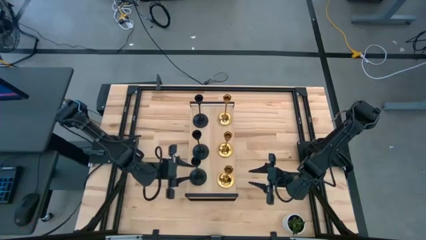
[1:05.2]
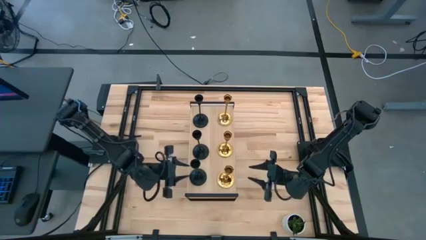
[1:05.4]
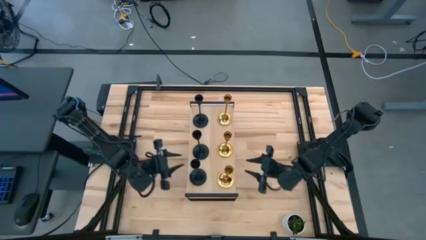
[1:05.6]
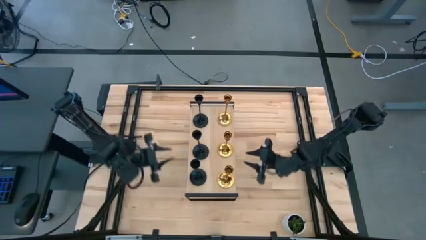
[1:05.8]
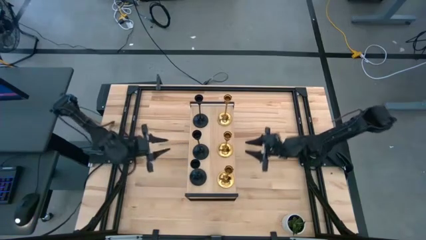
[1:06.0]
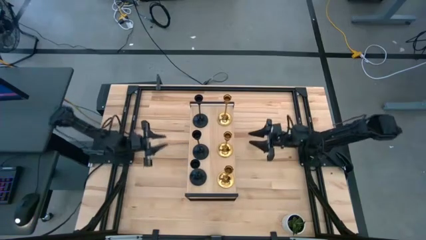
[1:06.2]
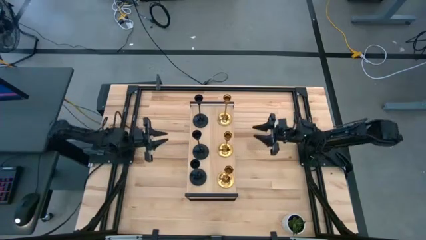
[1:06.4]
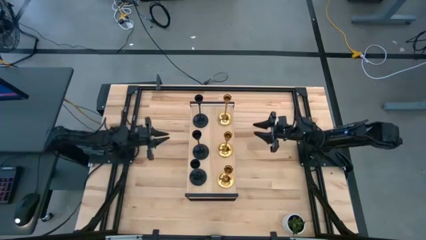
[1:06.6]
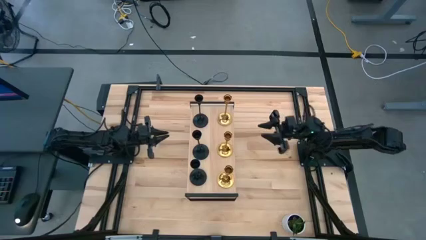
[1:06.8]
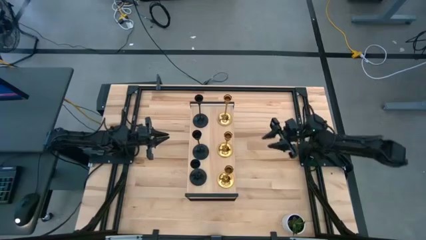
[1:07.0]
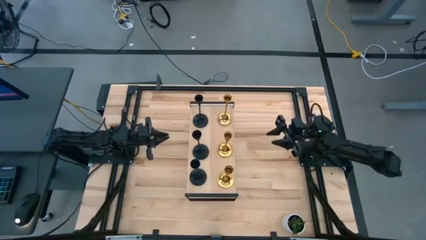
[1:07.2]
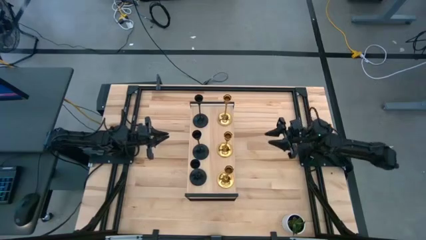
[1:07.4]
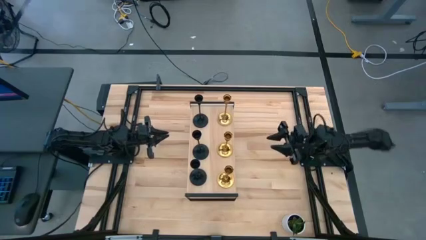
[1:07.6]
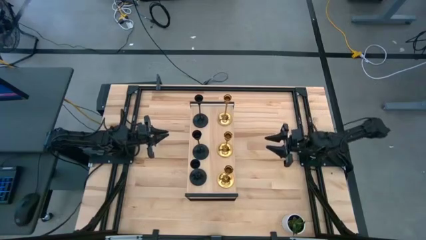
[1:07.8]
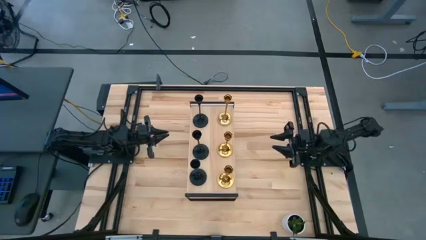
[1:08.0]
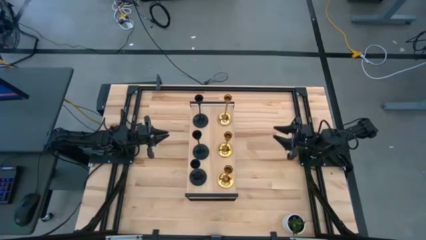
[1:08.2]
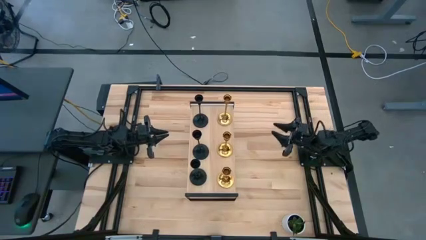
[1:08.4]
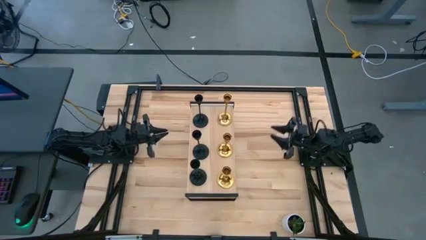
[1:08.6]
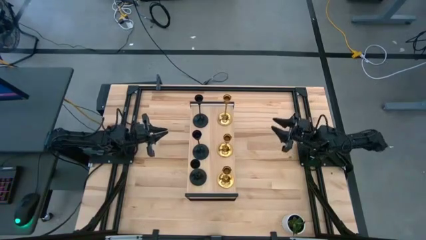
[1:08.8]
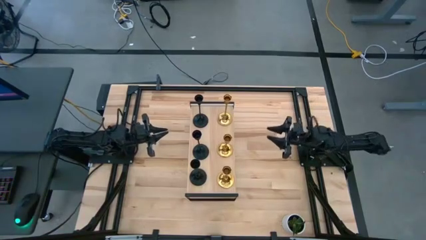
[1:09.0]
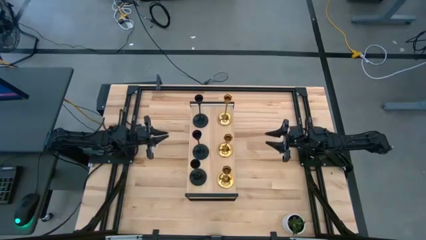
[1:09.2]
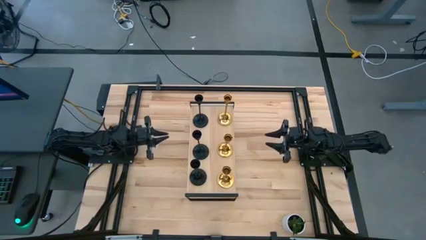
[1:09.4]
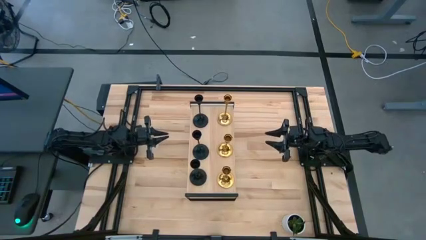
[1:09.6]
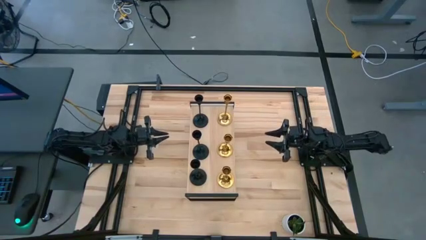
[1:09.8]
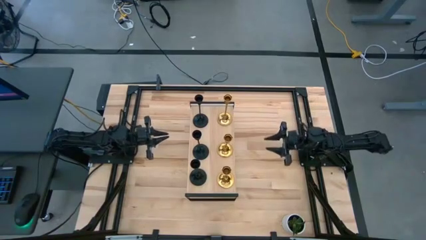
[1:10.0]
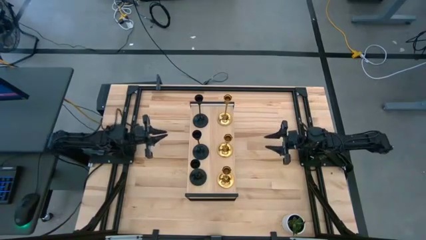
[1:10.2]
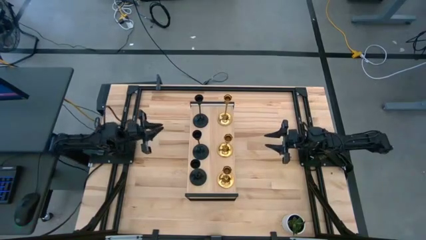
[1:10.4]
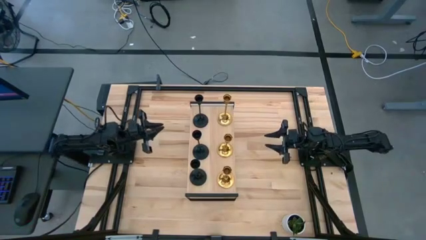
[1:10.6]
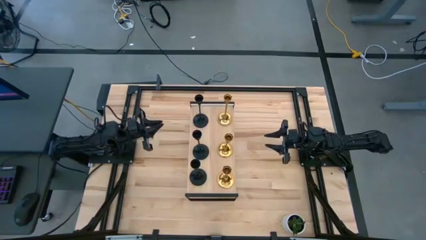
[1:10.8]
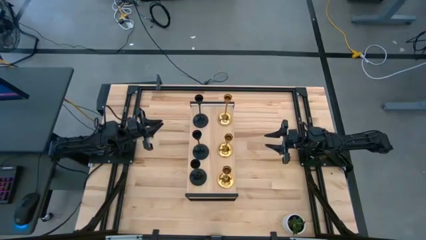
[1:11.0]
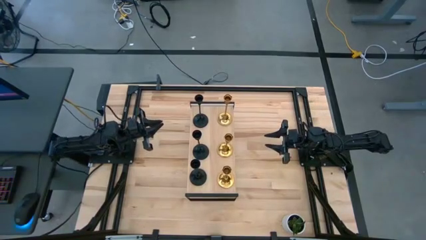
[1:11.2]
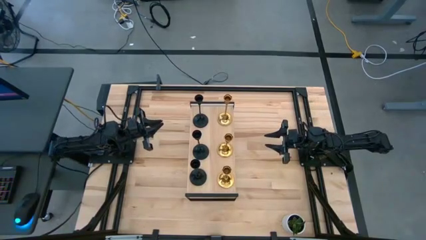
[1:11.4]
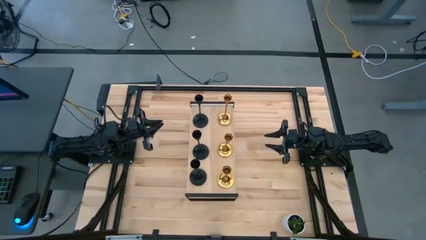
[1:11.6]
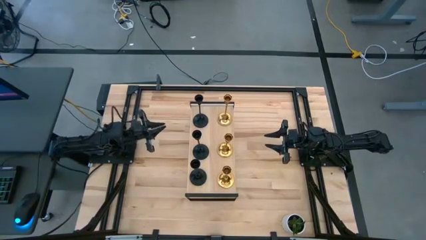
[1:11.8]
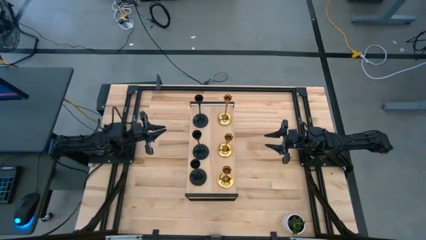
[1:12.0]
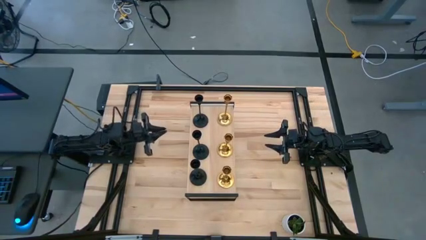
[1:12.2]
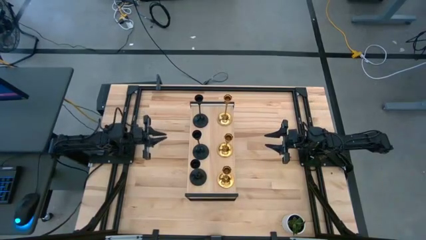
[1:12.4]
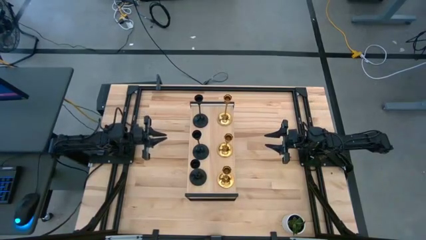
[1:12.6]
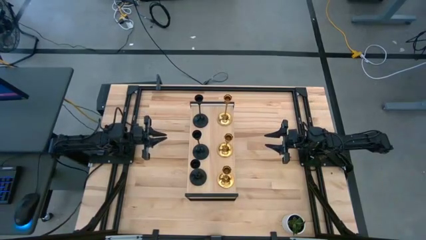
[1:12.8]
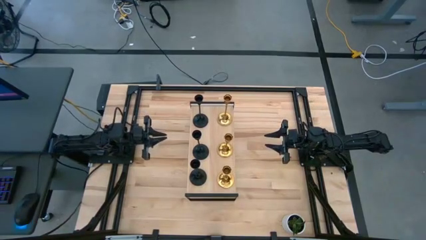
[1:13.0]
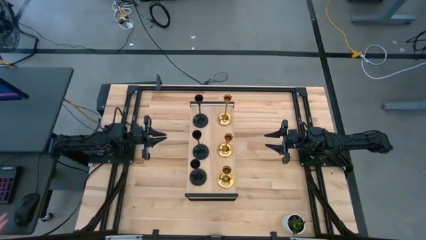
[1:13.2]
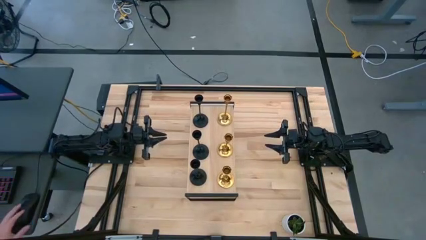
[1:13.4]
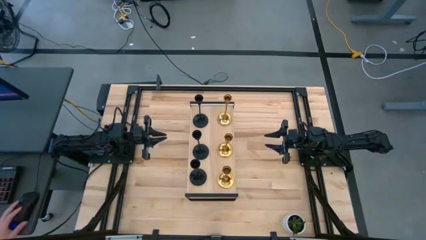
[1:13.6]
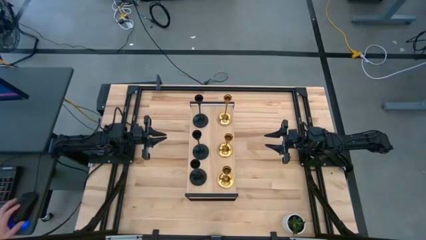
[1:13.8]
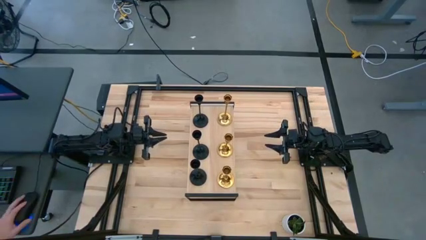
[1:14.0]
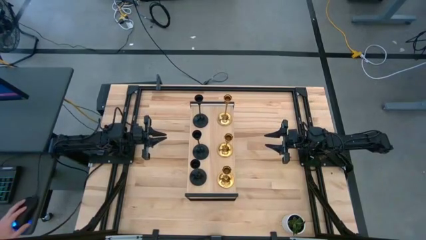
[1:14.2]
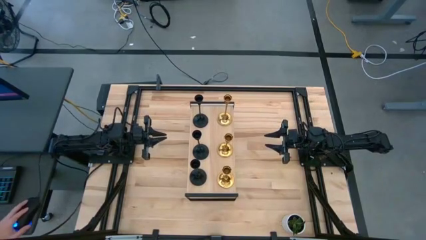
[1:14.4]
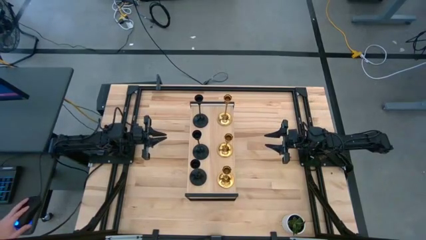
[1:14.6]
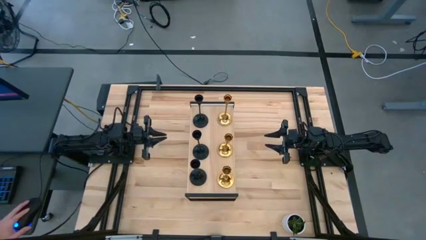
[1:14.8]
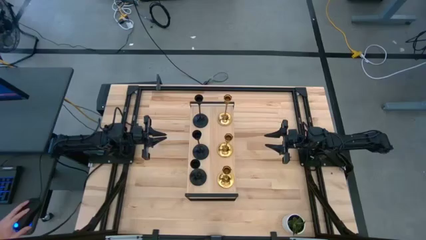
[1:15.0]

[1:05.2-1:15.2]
Task: Pick & Place candle stick holders
Return to Home Position

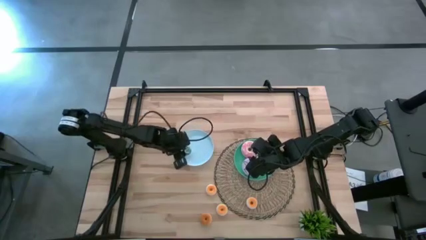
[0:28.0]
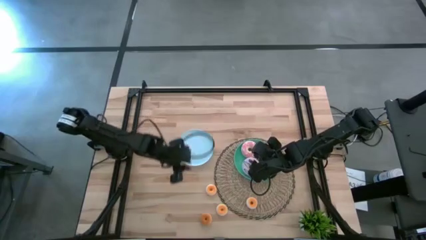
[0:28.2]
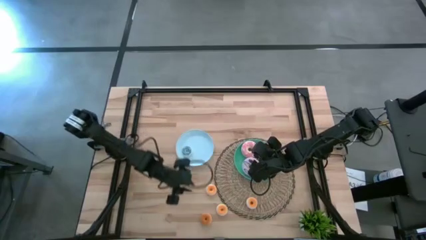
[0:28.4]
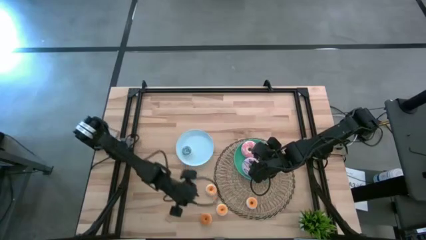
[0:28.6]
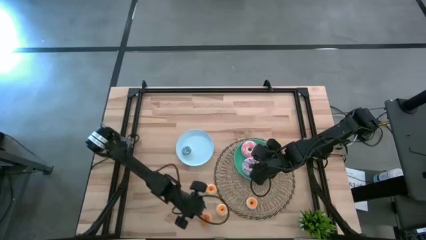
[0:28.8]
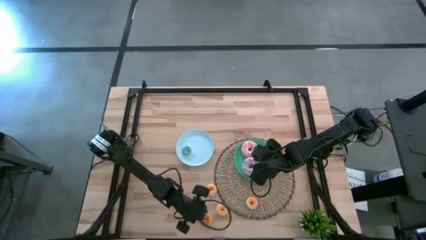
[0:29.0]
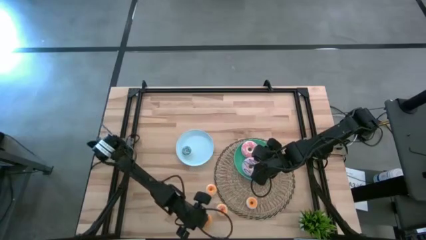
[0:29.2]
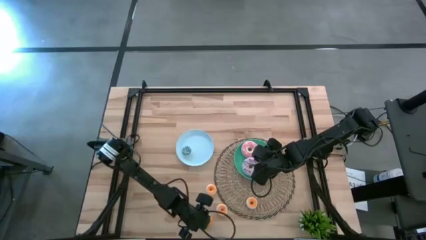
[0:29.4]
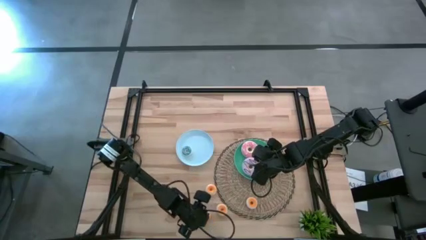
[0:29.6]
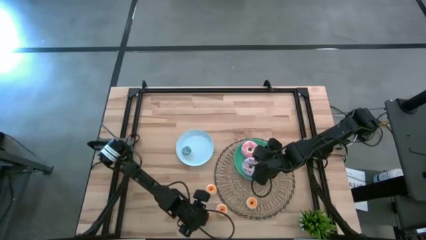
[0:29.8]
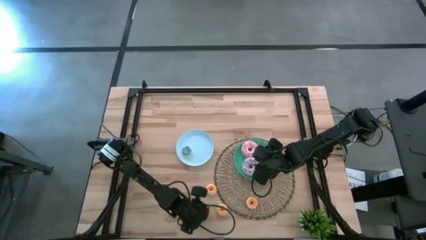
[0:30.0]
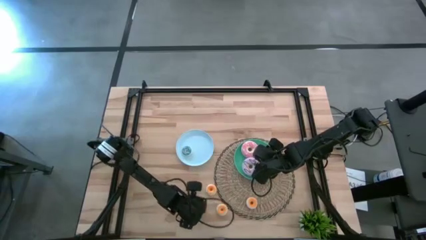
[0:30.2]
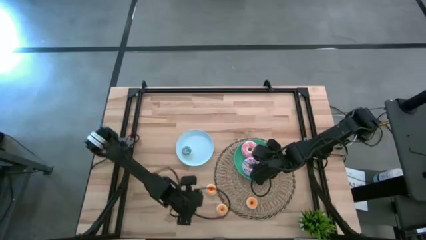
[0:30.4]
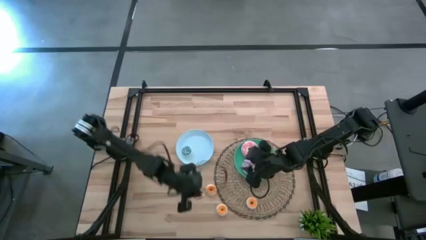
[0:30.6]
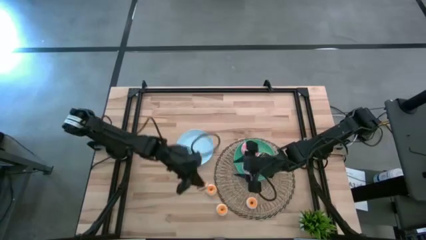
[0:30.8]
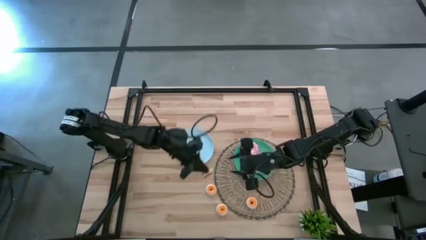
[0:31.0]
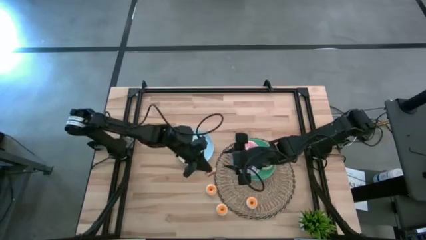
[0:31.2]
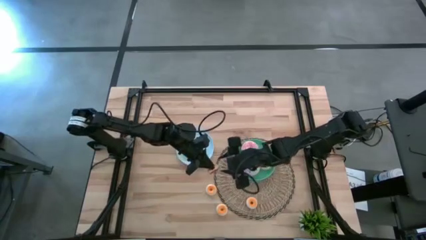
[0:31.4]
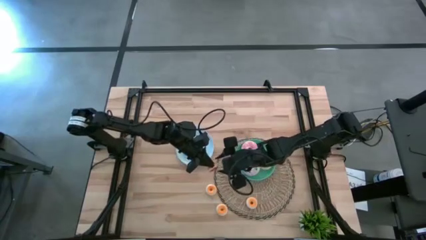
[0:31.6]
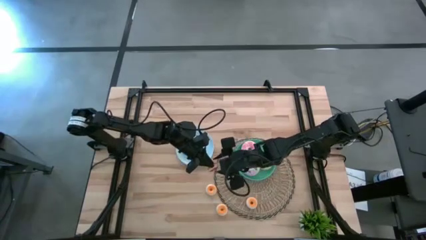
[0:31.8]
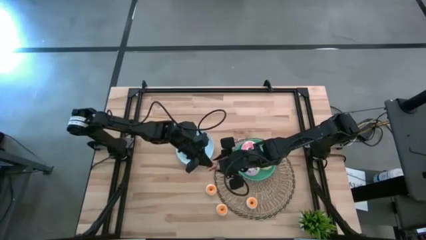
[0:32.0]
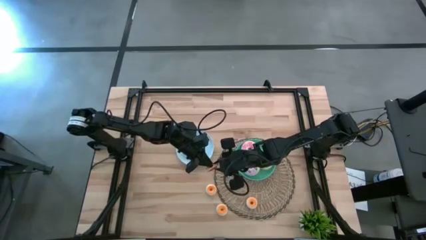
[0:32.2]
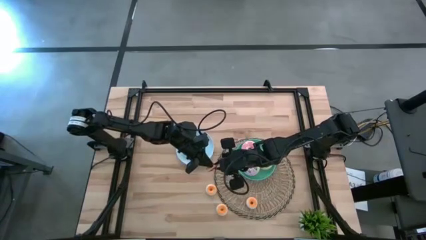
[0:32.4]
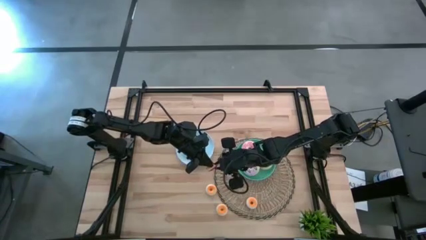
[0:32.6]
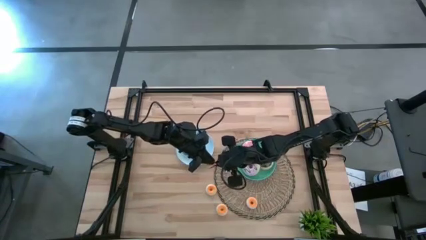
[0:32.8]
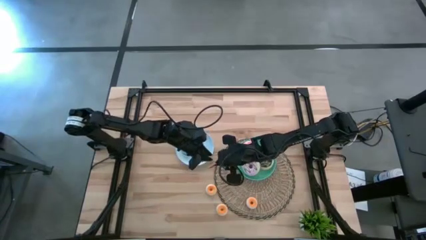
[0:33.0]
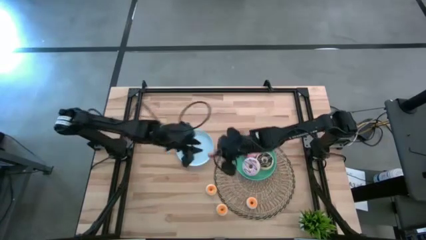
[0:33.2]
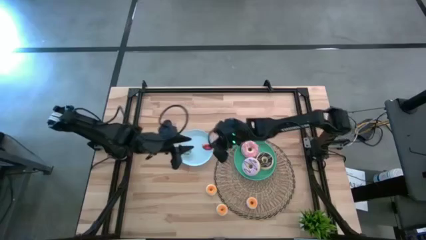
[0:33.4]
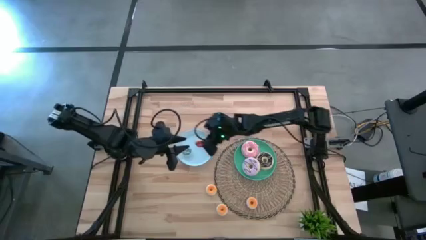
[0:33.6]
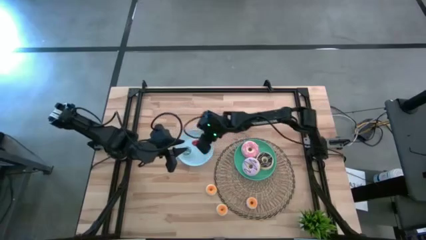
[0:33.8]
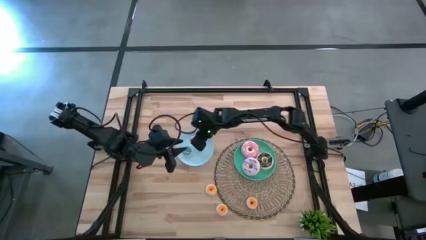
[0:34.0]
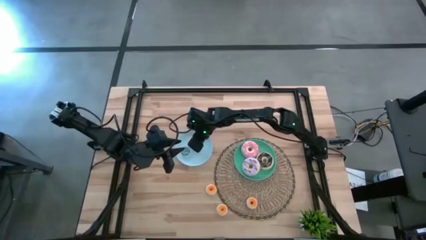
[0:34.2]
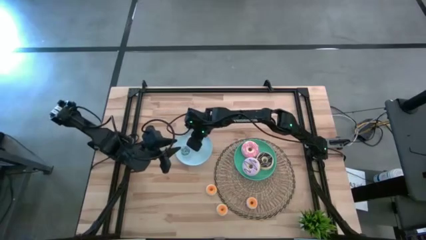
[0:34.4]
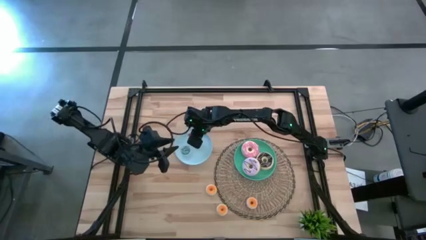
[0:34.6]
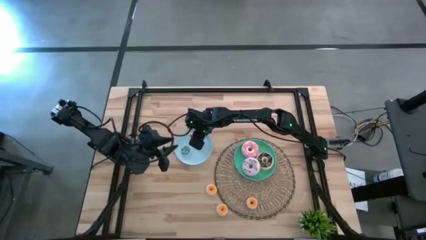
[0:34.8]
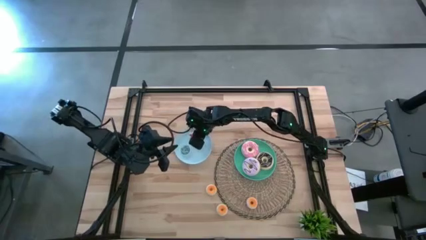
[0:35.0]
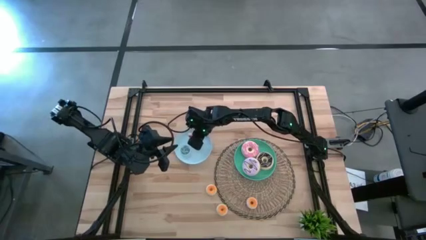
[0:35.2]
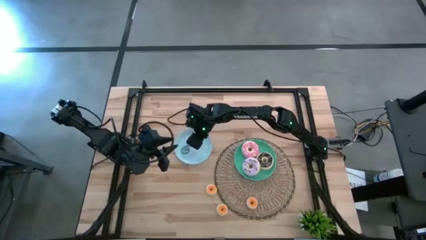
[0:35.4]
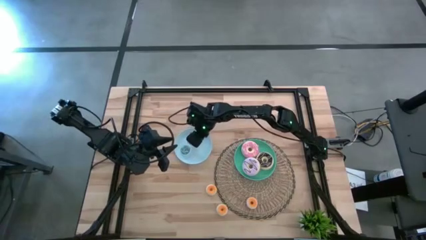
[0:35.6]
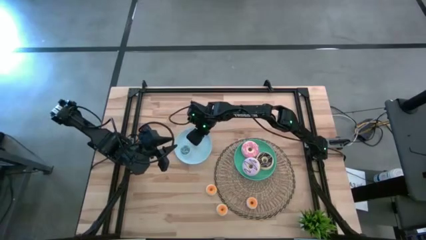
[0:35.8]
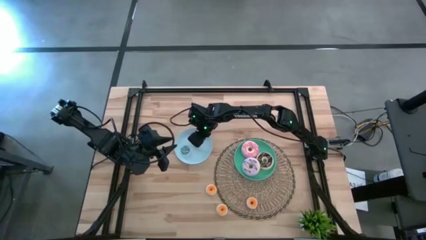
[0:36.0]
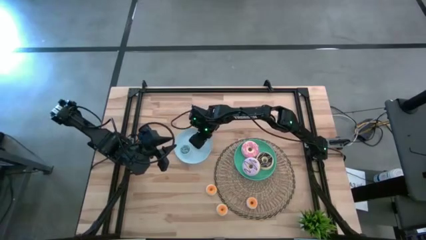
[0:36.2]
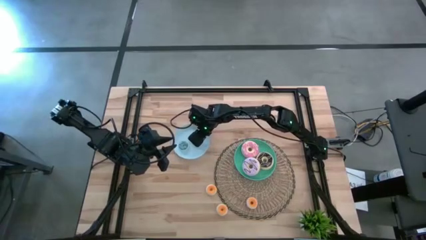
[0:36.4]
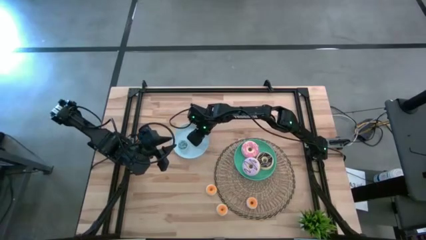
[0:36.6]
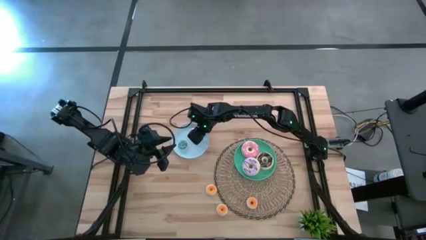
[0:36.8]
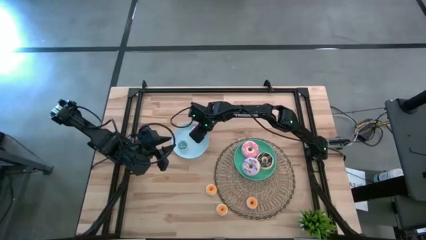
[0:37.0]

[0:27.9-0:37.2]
Task: Pick & Place donuts
Put the small orange donut onto the blue plate
